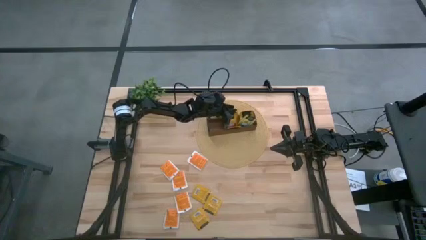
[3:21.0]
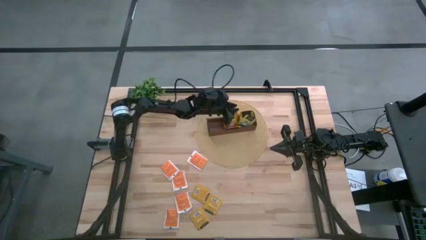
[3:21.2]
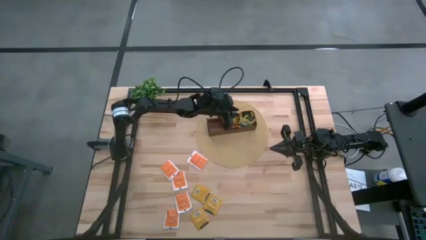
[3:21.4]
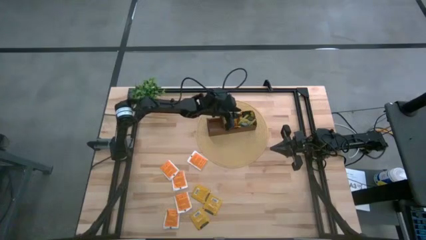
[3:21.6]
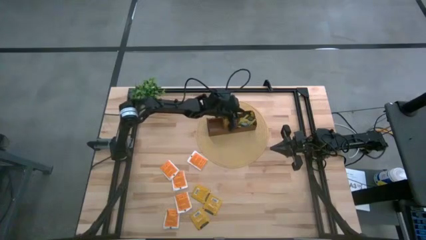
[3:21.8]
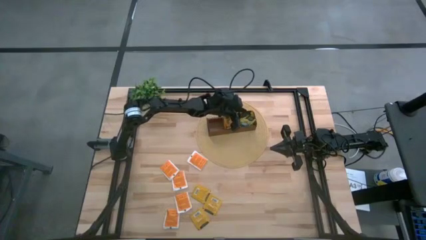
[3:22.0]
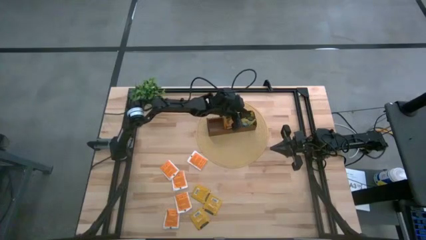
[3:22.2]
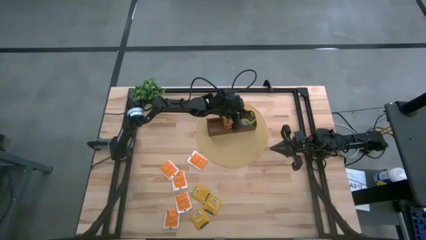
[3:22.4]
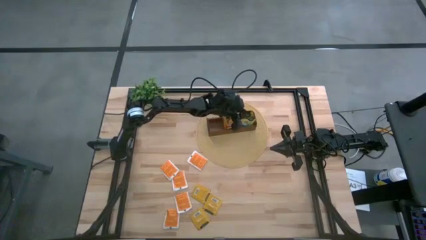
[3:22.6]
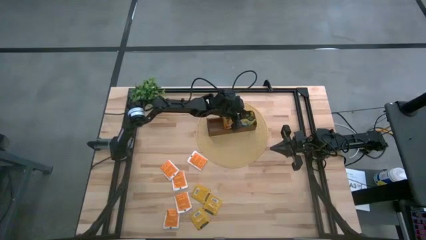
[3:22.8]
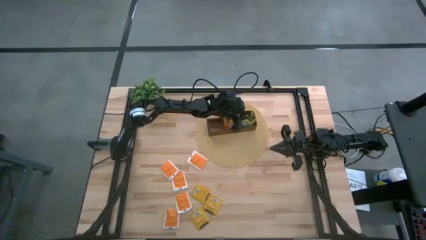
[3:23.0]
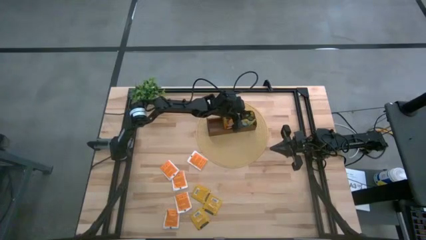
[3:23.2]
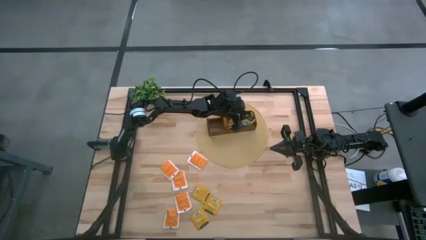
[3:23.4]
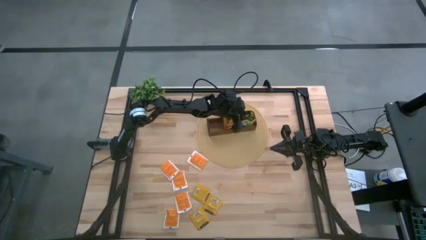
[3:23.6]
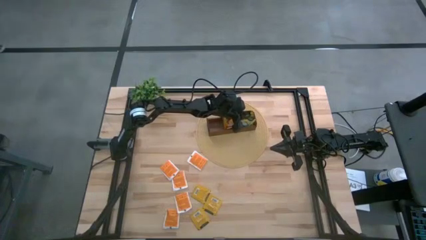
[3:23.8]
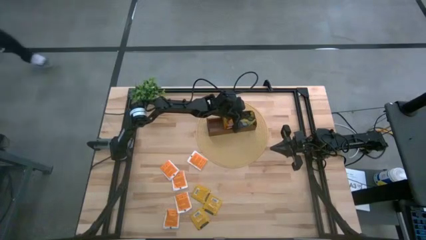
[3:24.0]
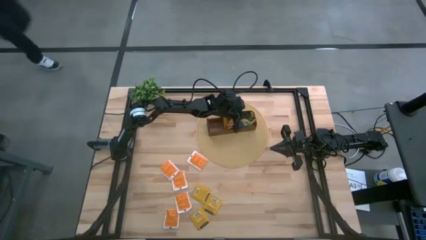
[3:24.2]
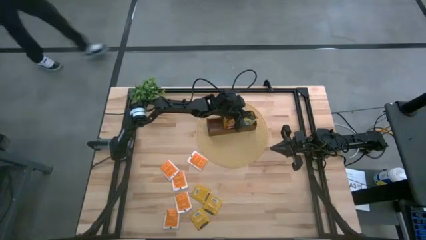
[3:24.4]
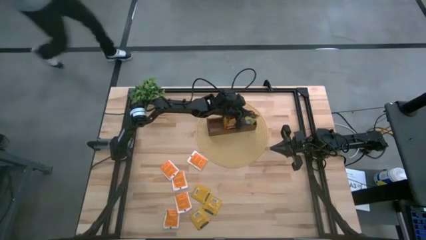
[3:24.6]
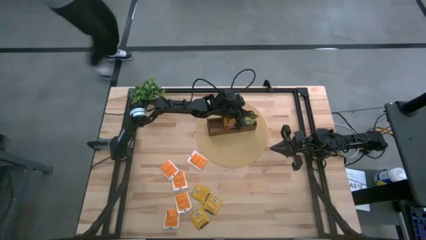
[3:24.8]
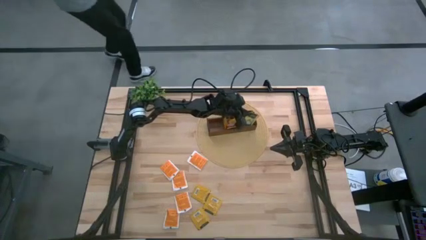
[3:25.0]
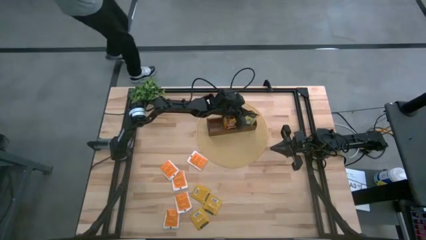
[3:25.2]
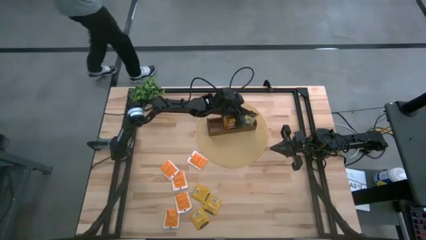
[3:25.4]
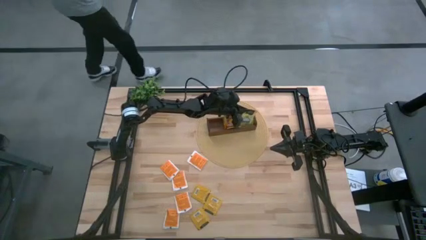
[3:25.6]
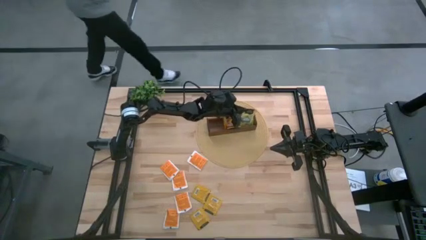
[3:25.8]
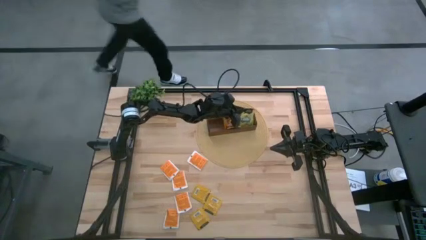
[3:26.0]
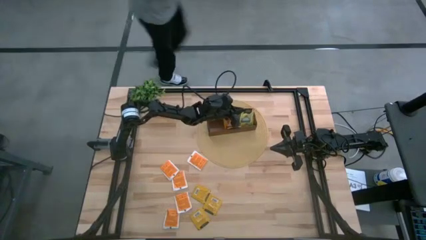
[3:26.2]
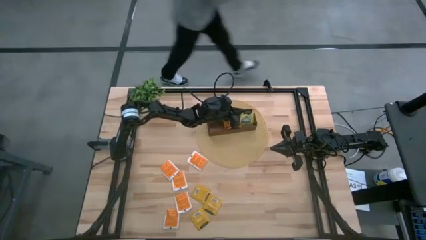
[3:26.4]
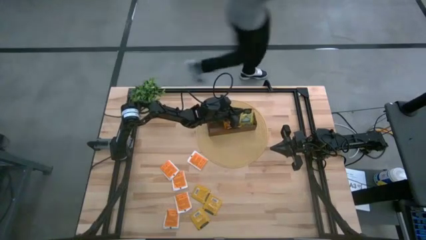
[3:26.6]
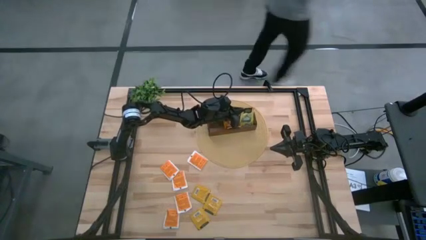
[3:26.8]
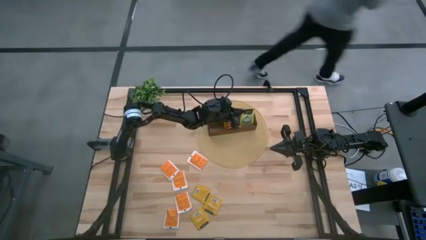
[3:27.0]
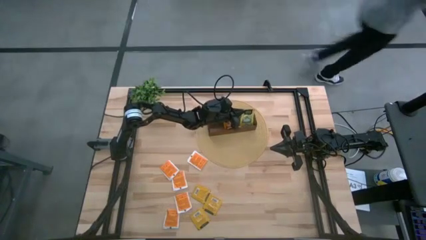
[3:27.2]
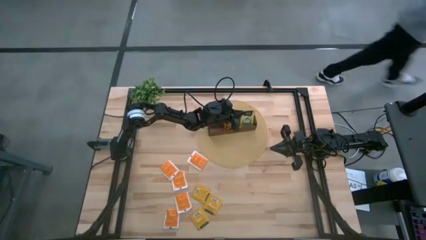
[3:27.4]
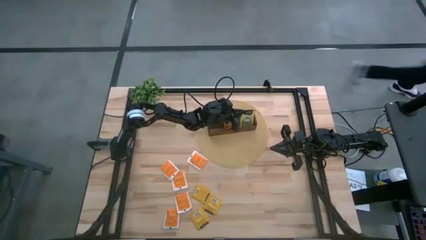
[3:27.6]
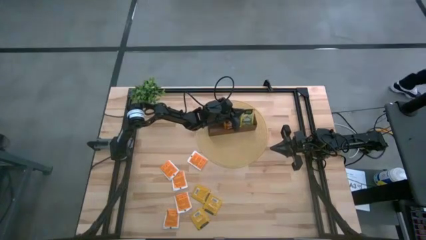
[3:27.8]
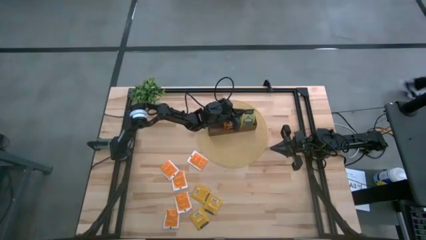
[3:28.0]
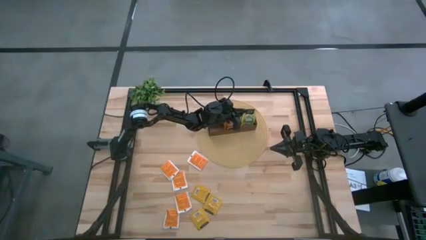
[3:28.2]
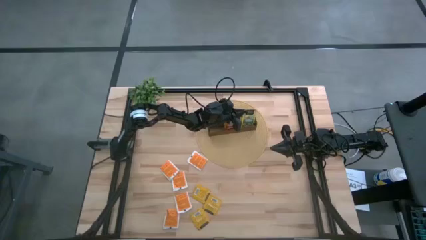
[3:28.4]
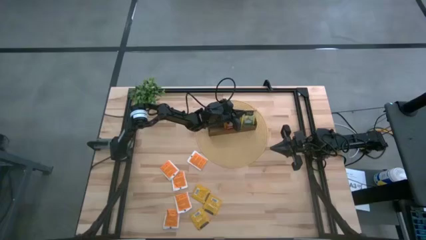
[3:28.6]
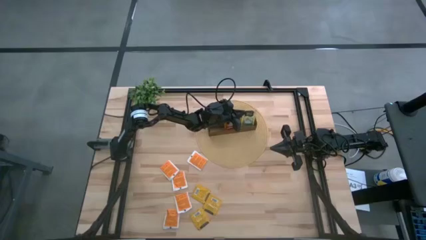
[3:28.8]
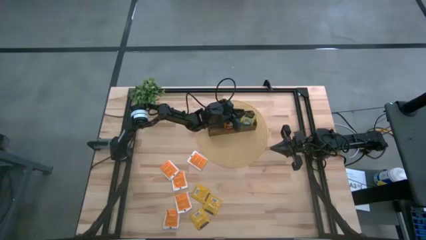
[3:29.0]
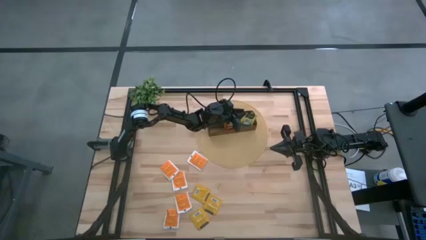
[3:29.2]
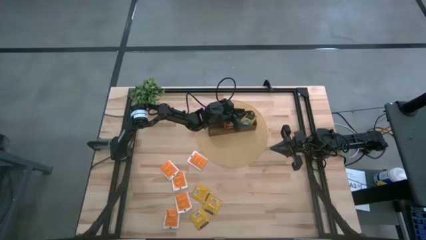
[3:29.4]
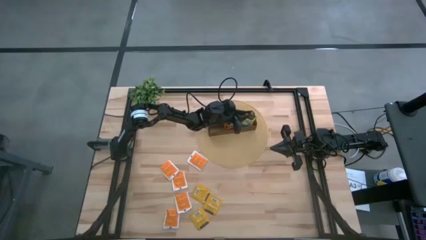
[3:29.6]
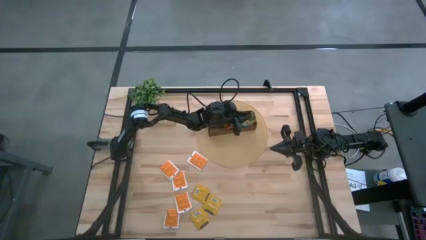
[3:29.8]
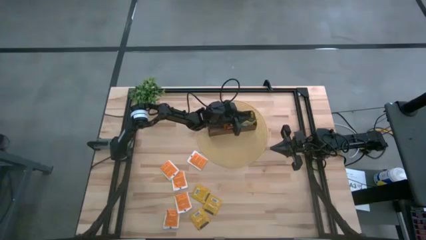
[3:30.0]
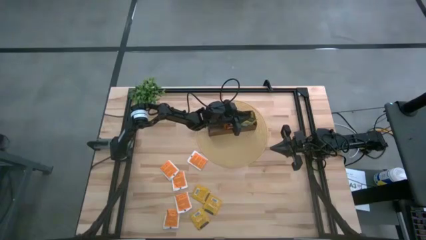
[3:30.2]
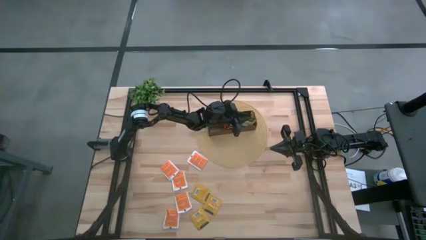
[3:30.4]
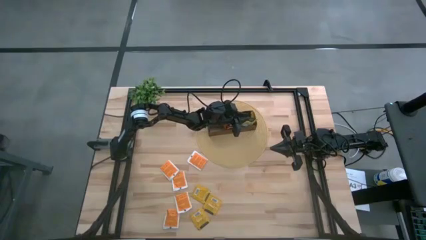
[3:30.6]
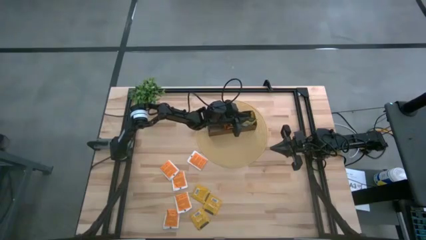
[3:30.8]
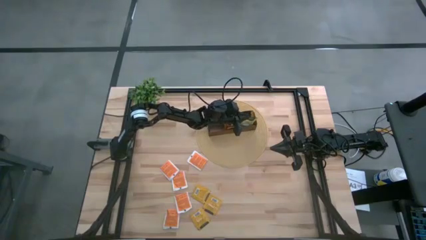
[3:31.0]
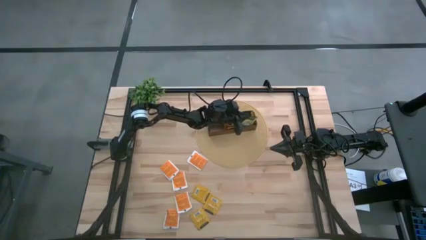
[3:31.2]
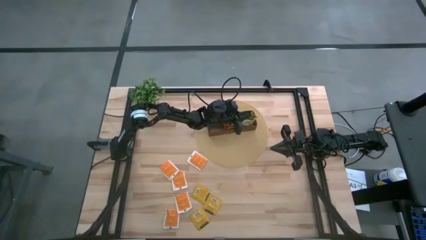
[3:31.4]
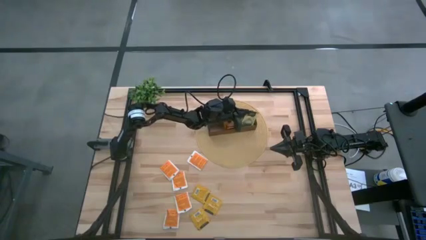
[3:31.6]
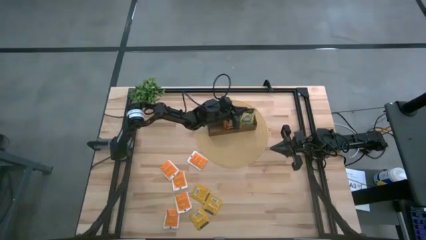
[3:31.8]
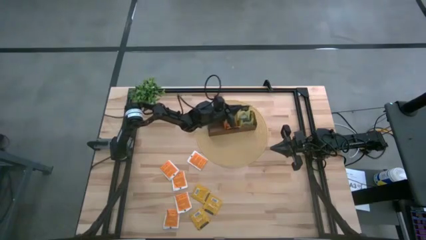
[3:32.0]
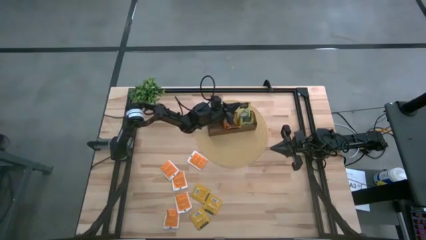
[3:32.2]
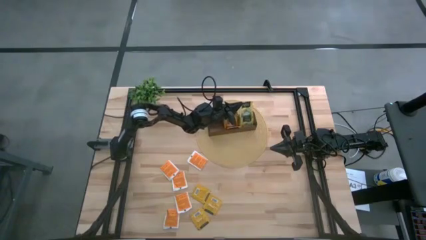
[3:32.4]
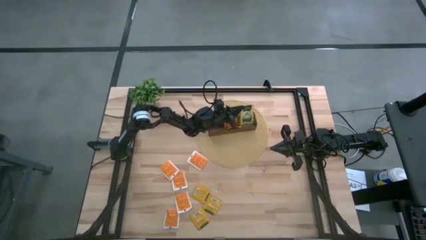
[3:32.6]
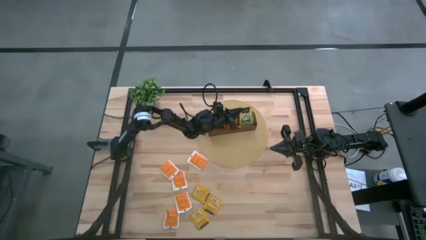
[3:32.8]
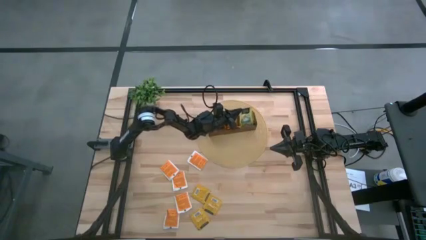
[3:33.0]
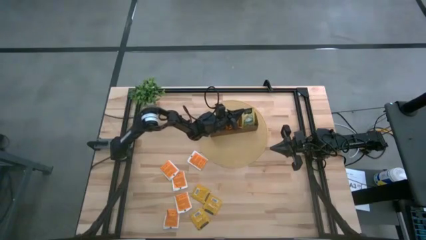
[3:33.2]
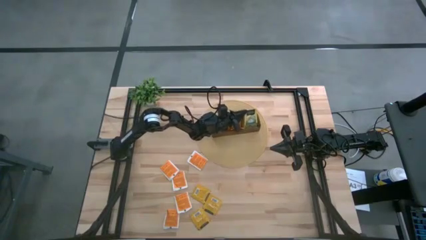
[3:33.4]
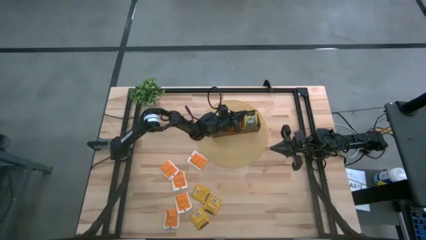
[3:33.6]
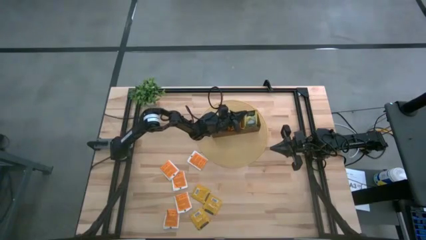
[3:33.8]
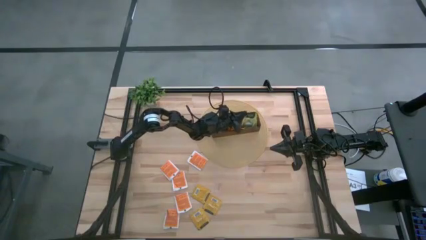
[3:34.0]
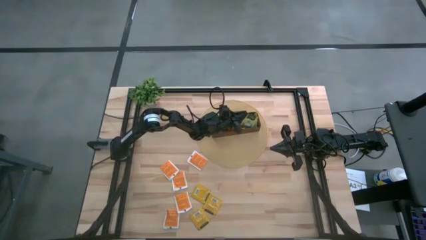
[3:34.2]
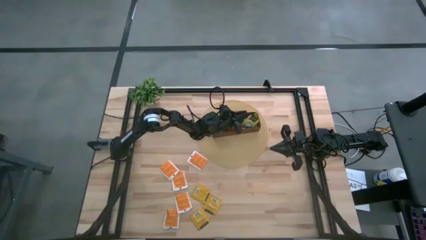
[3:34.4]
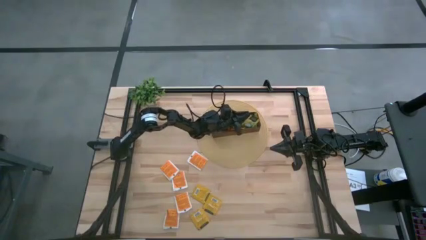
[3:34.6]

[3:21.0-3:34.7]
Task: Pick & Place Tea
Adjust the yellow tea bag in the right section of the wooden organizer to align the position
